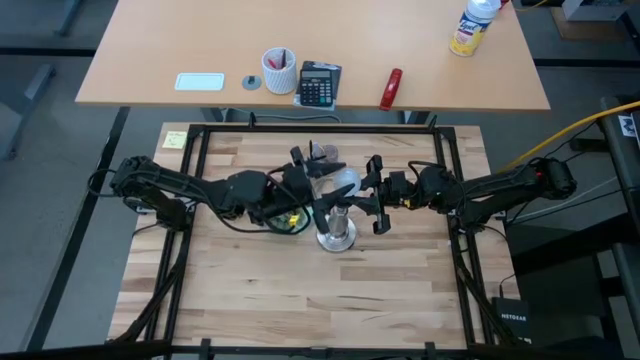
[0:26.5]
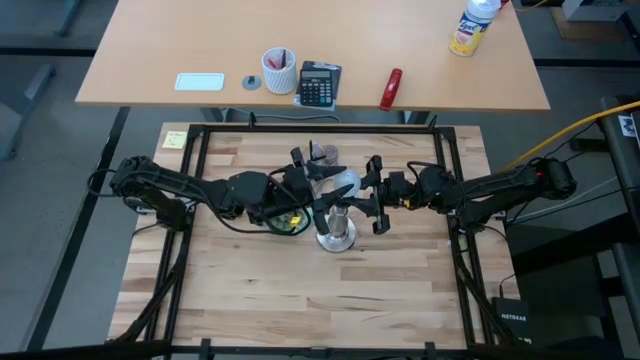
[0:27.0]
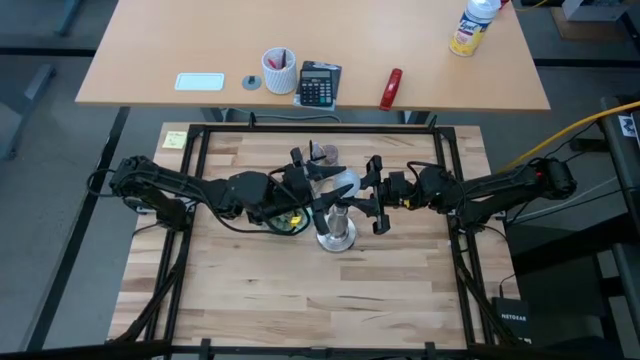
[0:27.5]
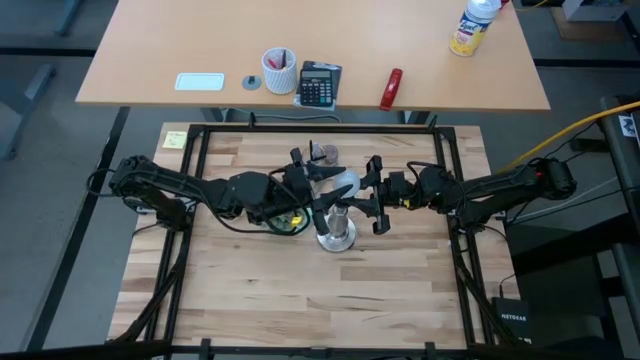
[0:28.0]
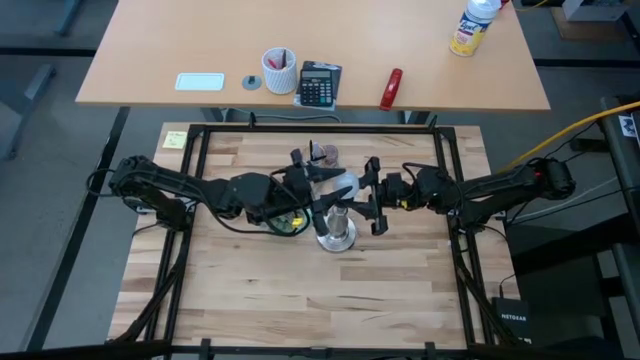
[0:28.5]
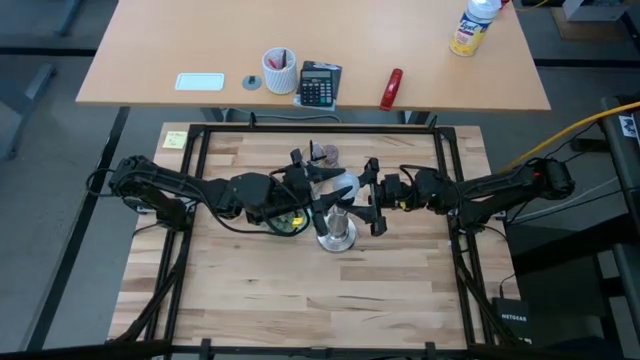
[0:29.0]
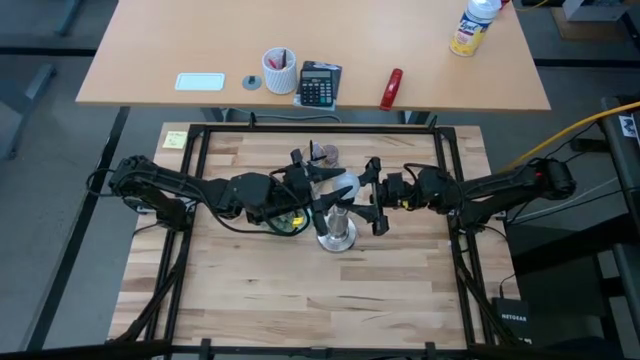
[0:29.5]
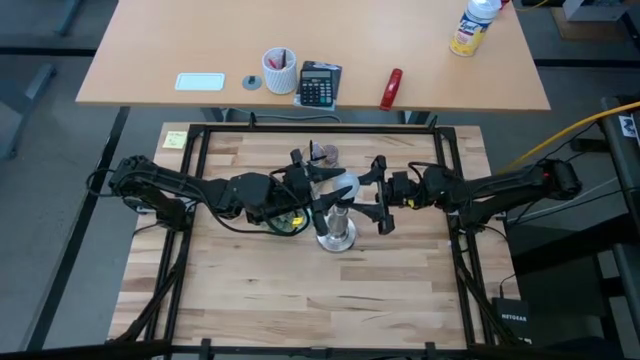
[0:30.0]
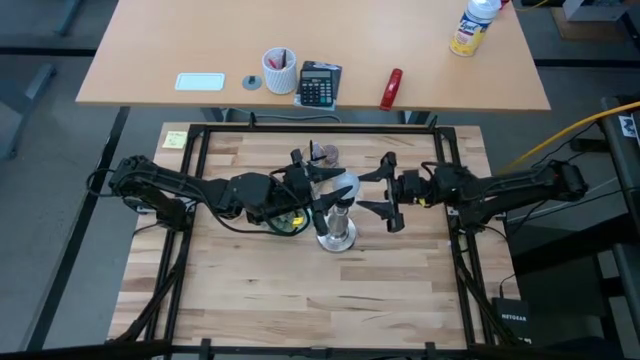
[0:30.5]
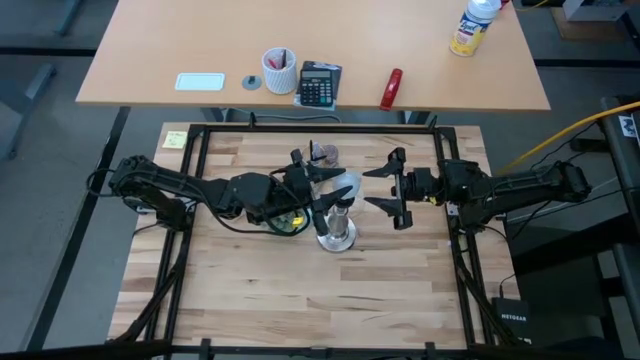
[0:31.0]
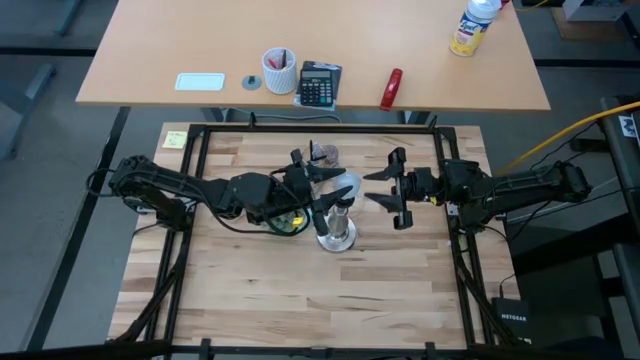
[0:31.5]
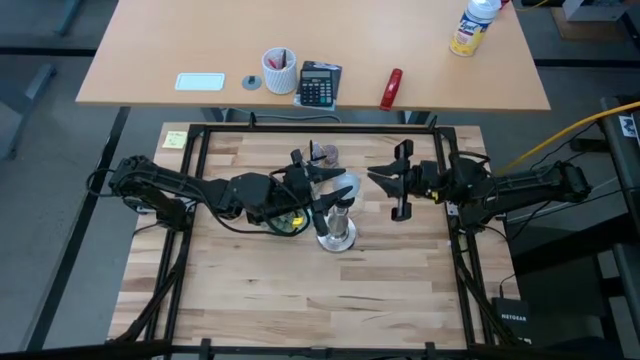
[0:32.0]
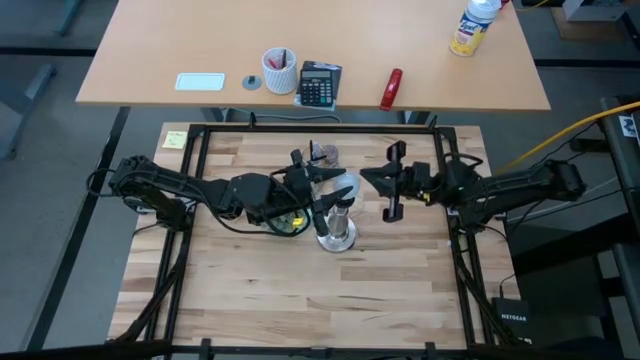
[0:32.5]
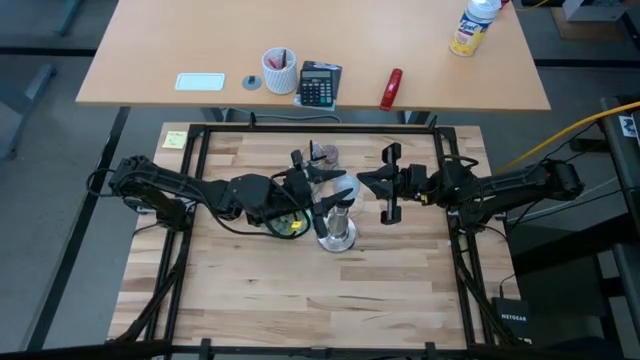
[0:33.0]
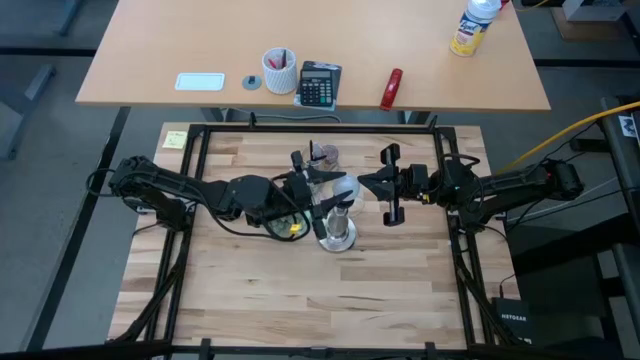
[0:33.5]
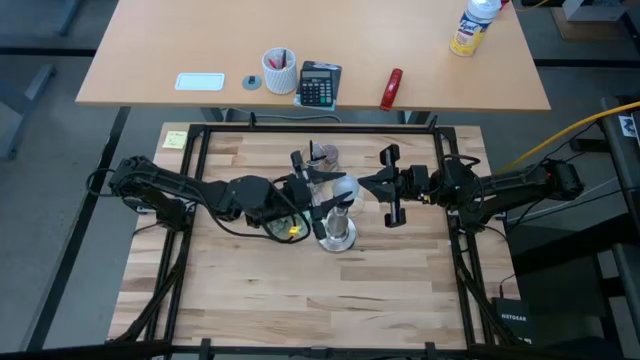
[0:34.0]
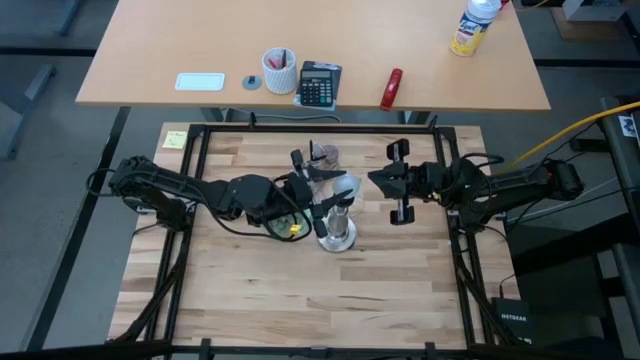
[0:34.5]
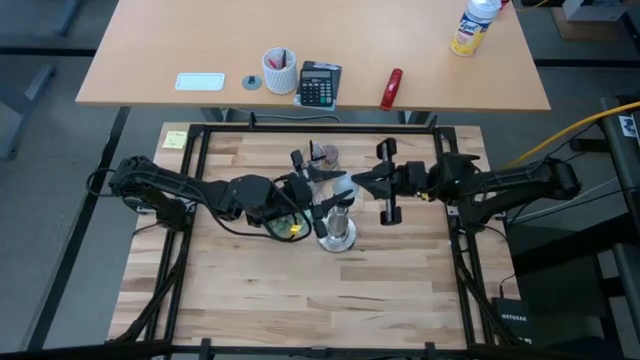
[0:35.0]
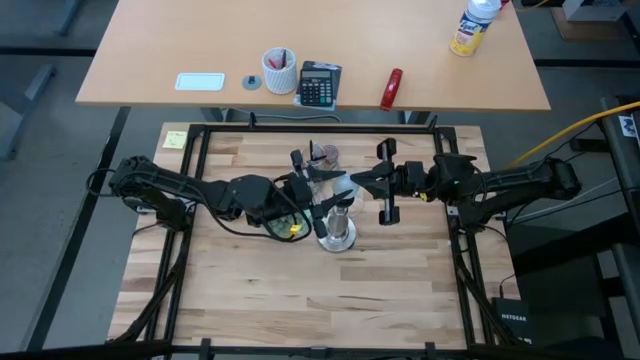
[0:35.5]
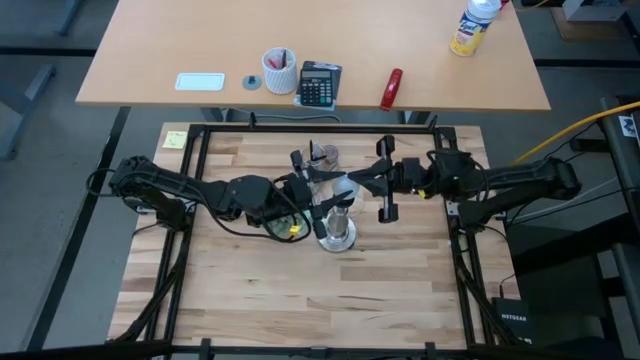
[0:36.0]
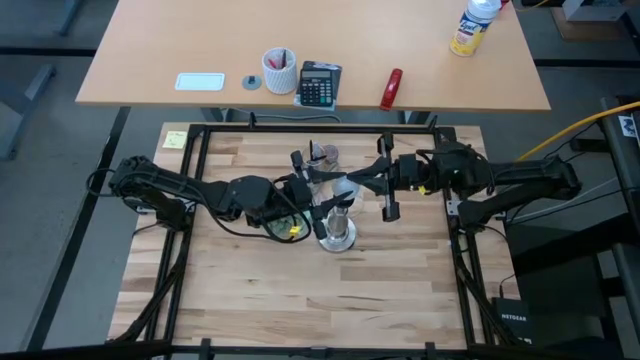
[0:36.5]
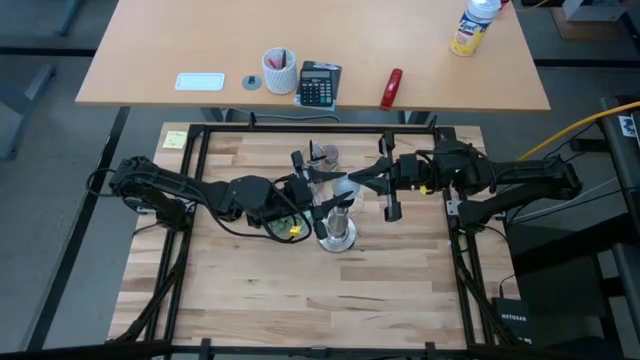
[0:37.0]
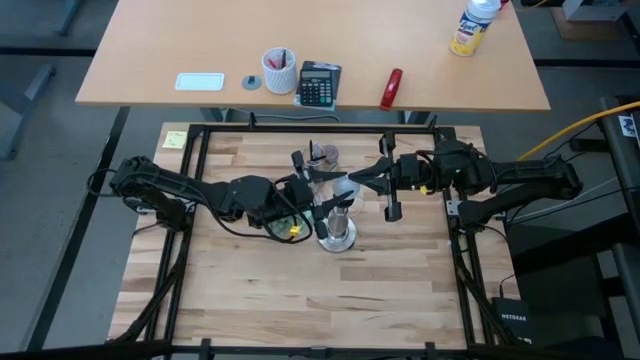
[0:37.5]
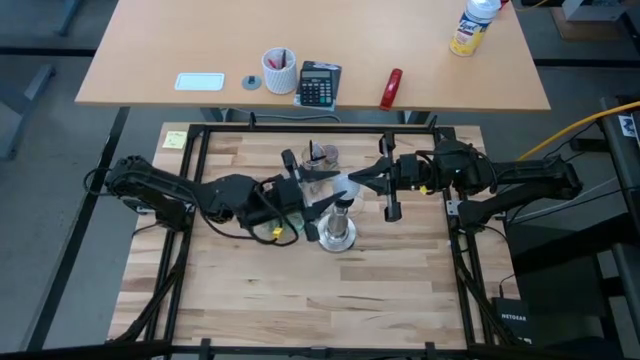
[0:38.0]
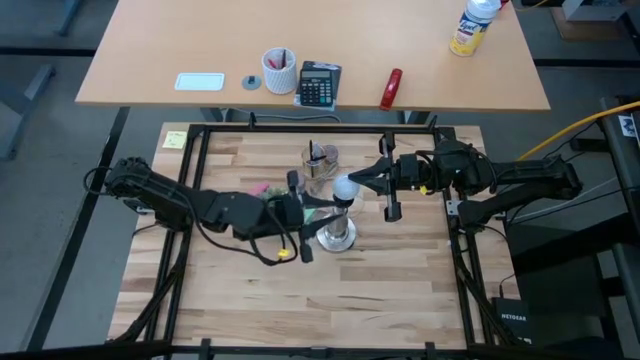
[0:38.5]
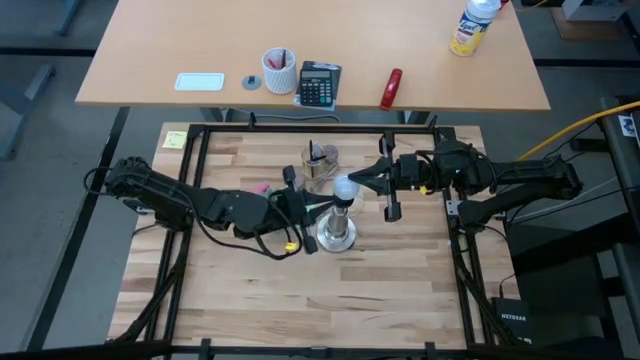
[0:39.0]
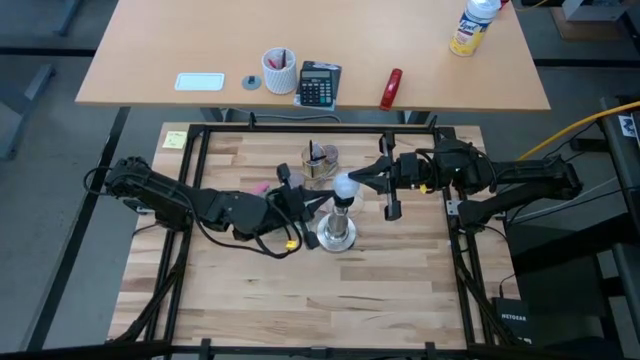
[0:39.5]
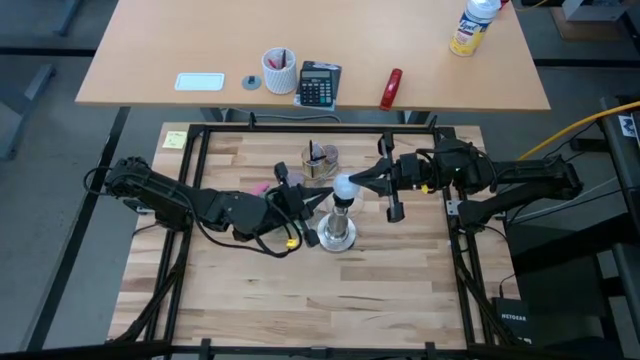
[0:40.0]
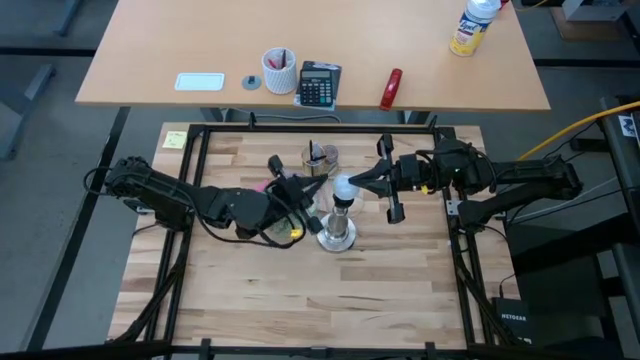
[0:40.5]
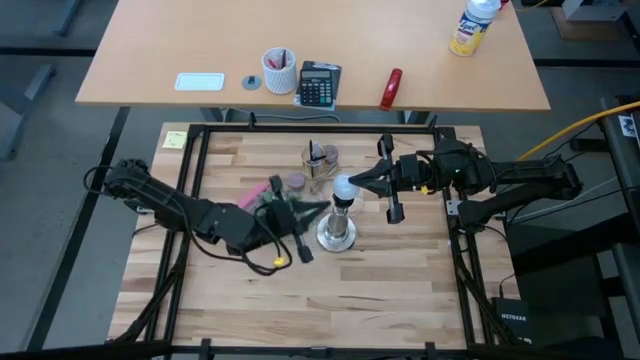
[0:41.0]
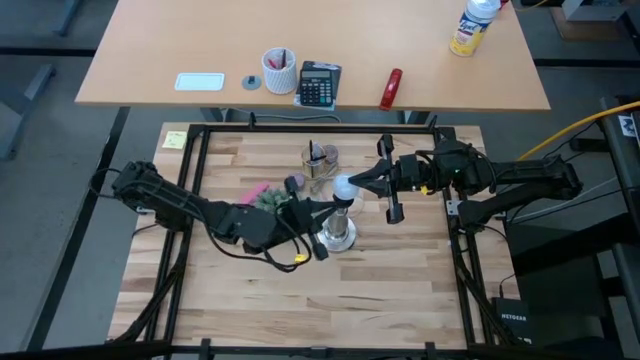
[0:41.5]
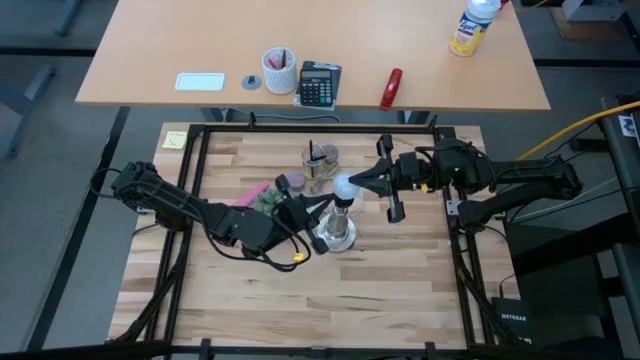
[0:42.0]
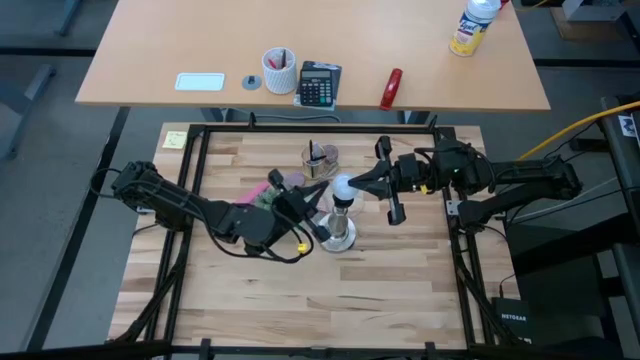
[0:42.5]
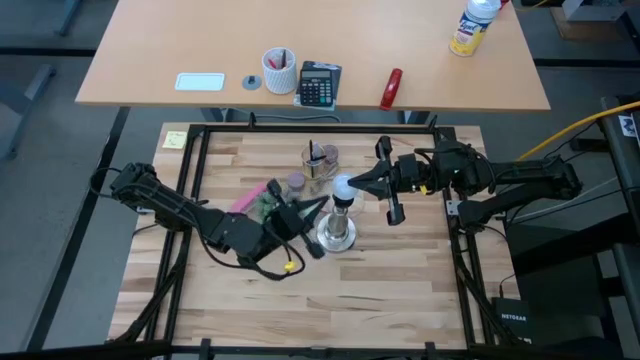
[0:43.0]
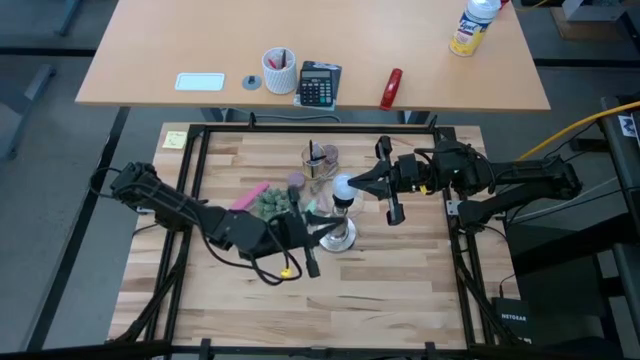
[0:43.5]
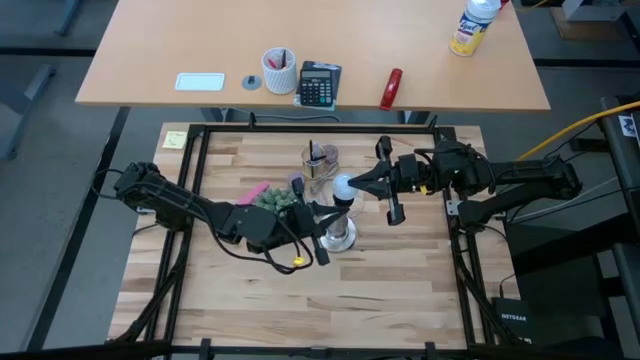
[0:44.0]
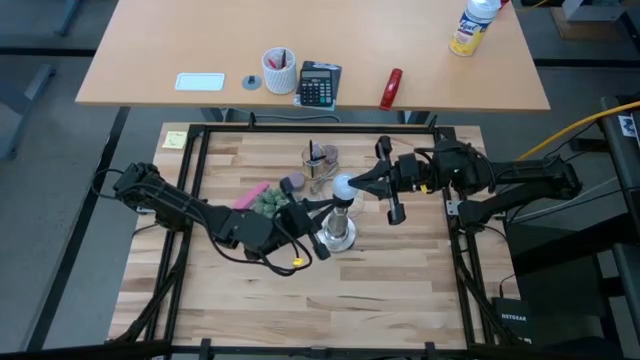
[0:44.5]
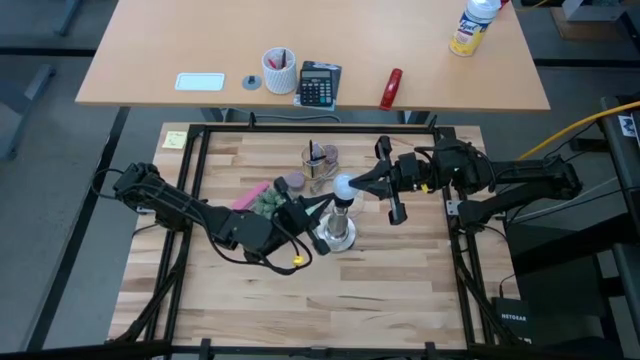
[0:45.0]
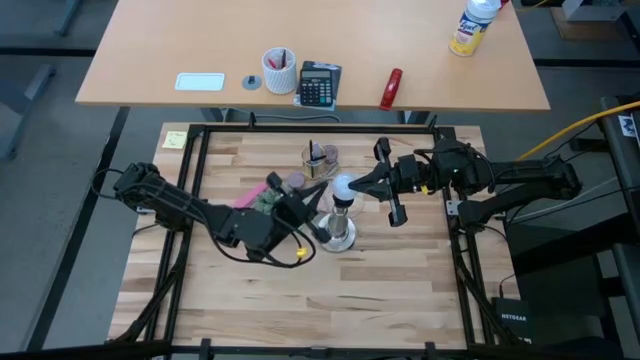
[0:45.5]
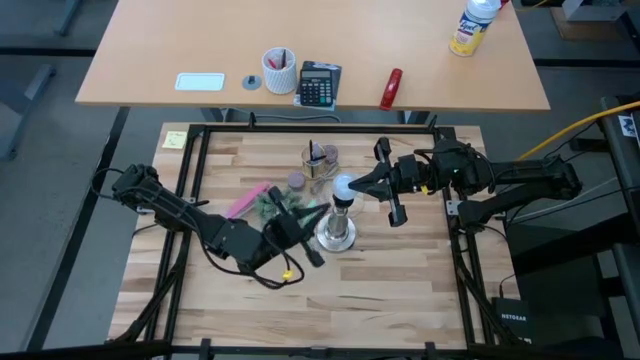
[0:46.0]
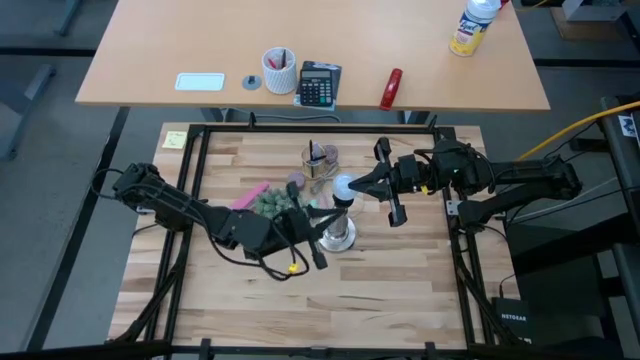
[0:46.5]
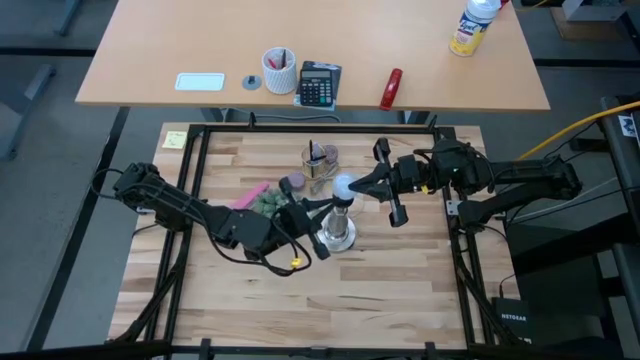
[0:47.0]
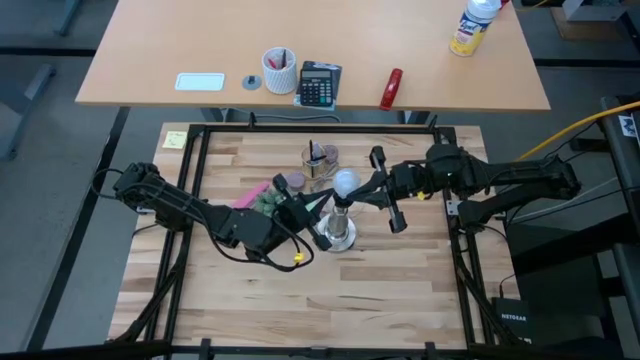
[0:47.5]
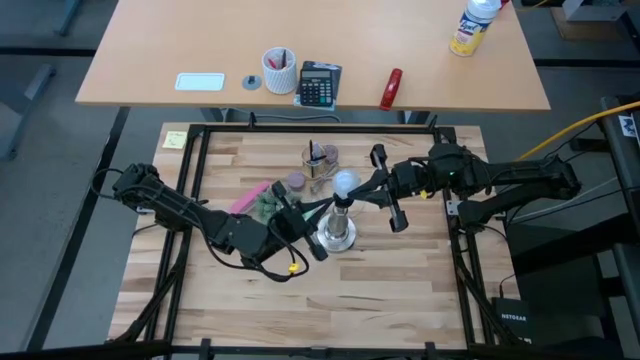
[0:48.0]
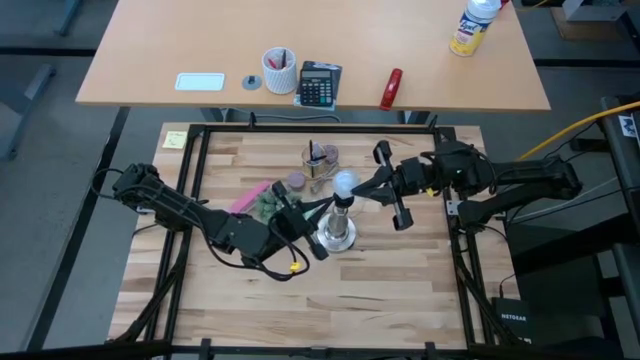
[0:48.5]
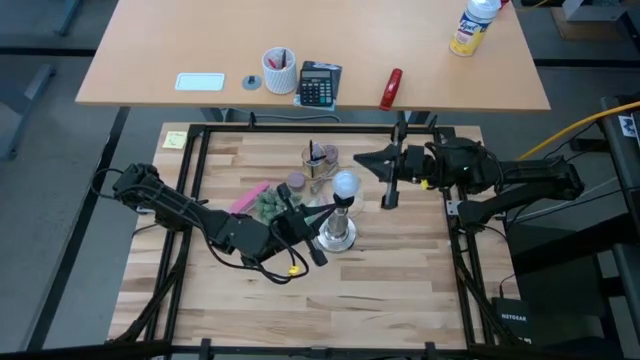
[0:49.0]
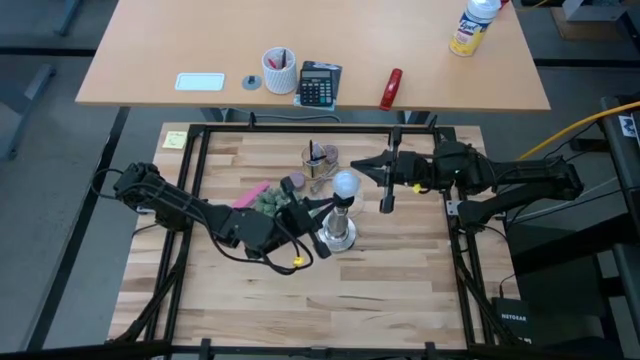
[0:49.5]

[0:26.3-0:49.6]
Task: Screw lightbulb
Insert the lightbulb into the lamp
